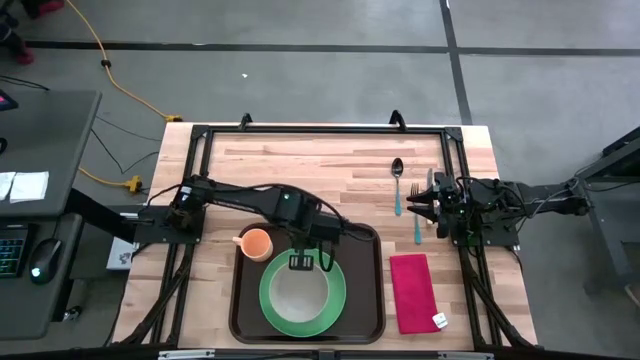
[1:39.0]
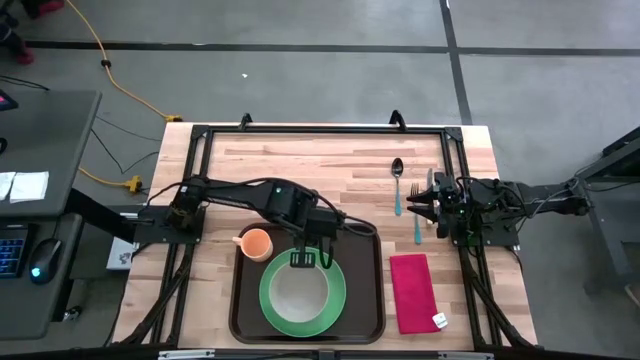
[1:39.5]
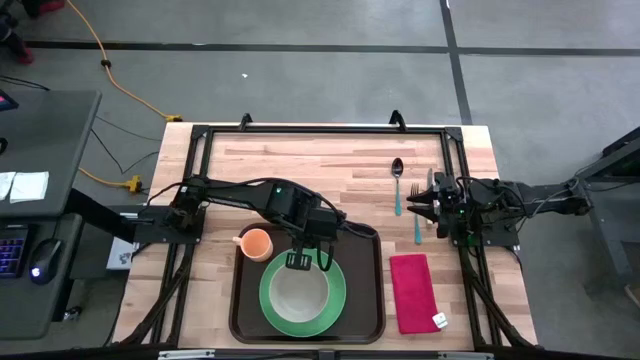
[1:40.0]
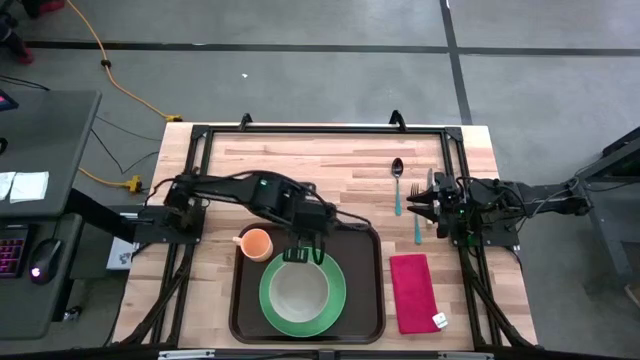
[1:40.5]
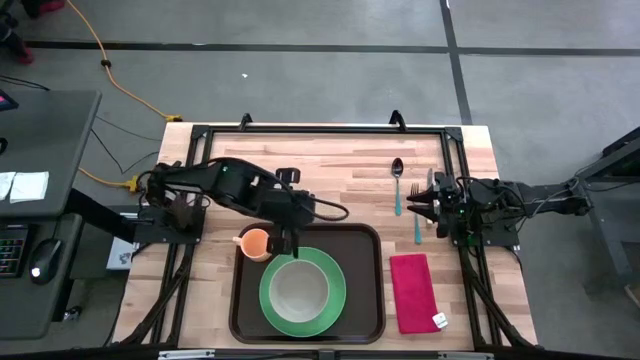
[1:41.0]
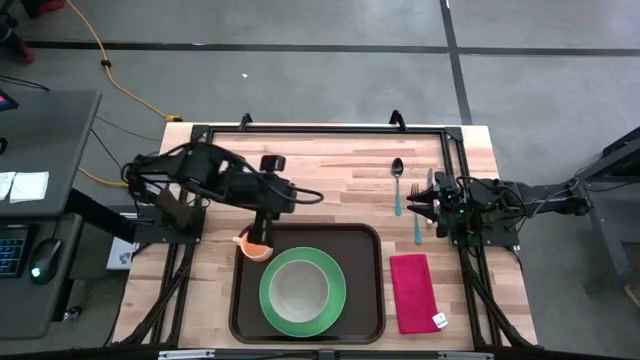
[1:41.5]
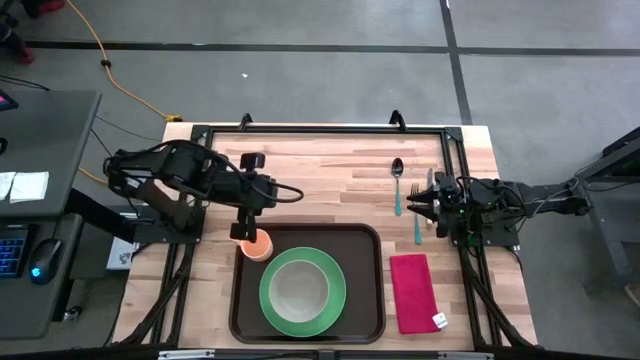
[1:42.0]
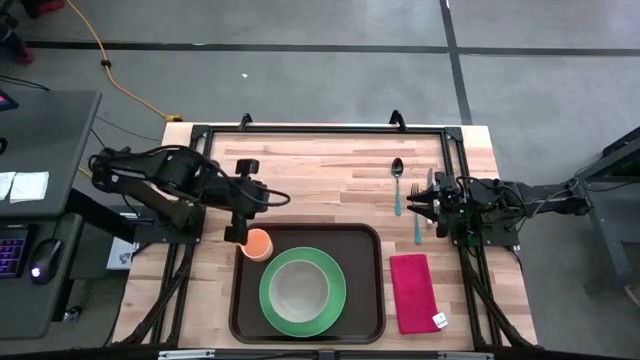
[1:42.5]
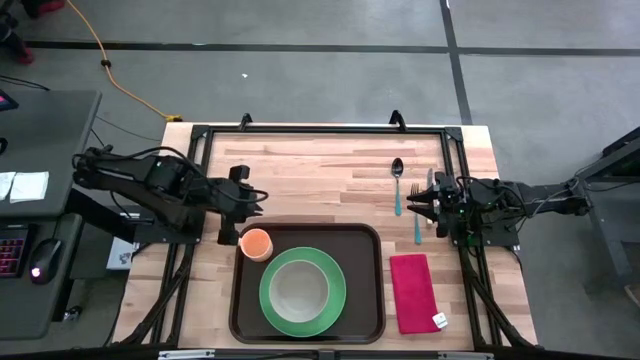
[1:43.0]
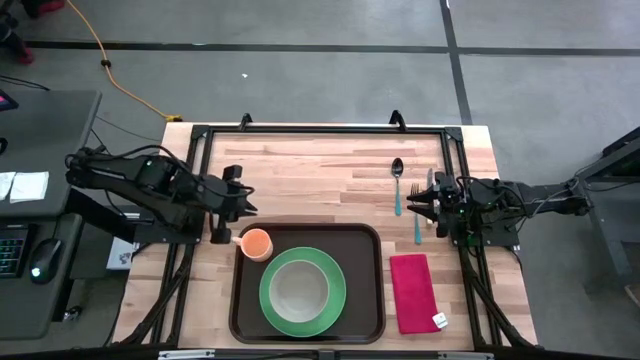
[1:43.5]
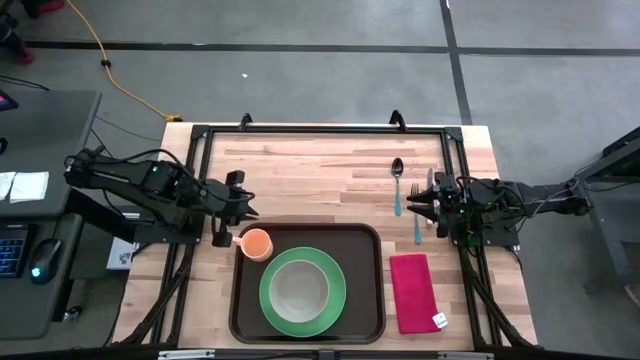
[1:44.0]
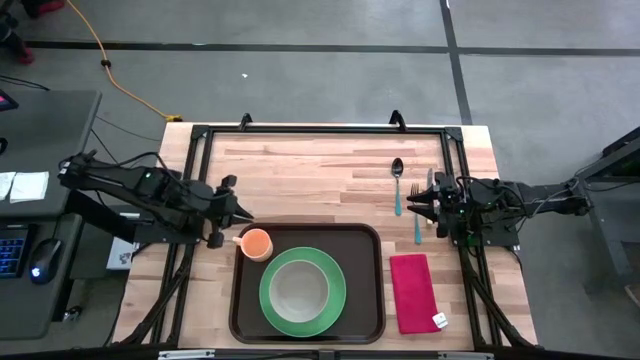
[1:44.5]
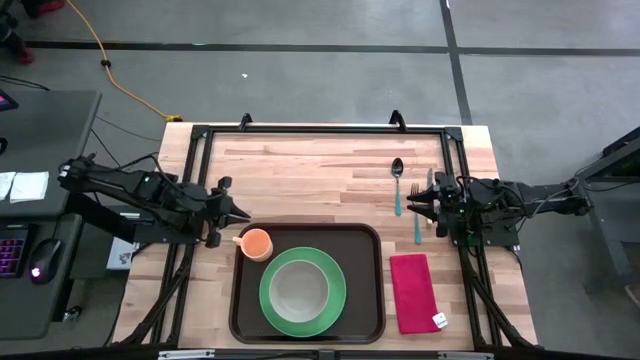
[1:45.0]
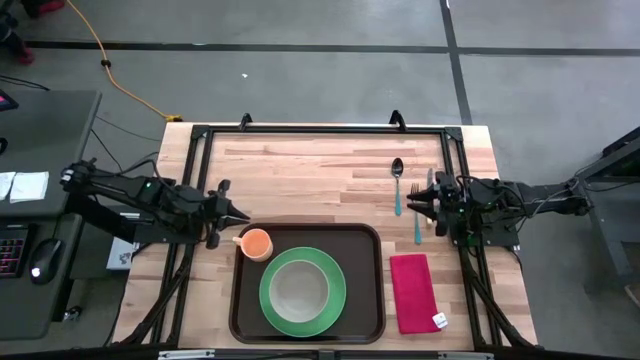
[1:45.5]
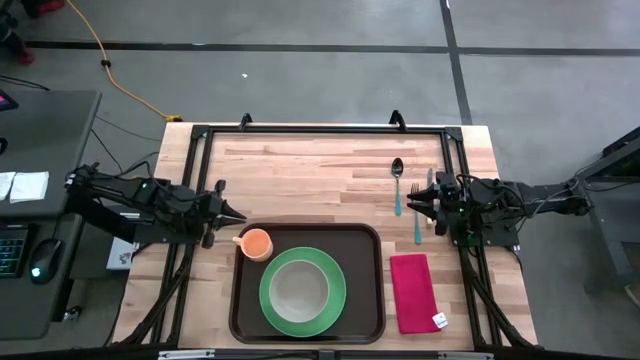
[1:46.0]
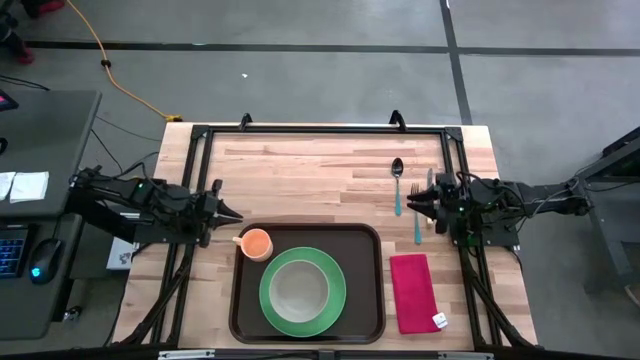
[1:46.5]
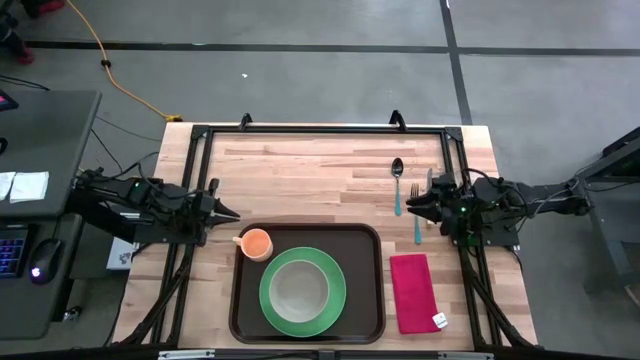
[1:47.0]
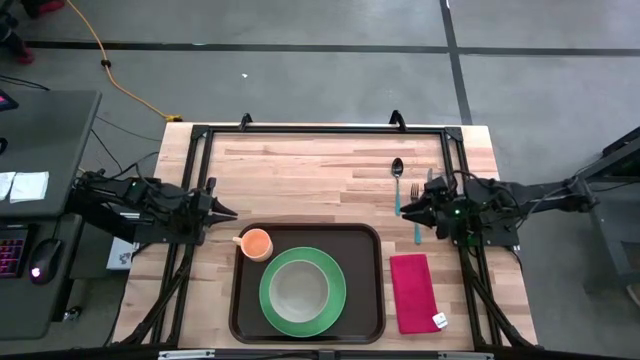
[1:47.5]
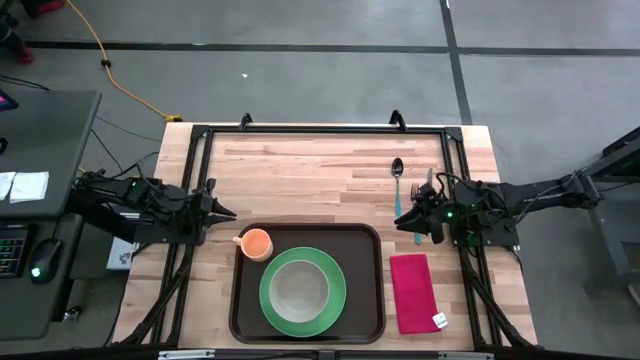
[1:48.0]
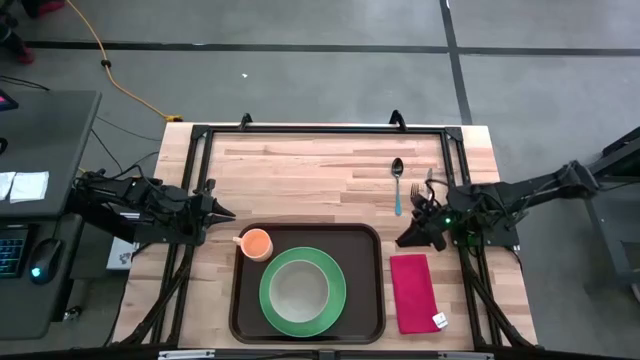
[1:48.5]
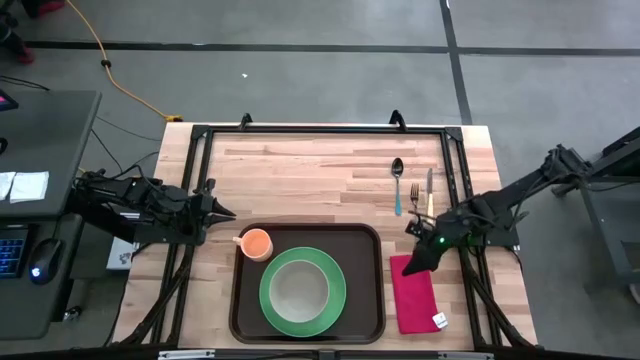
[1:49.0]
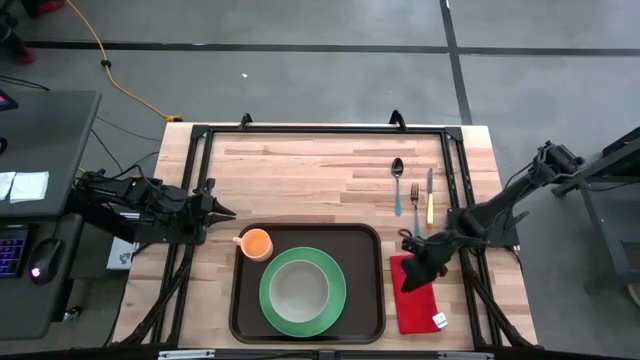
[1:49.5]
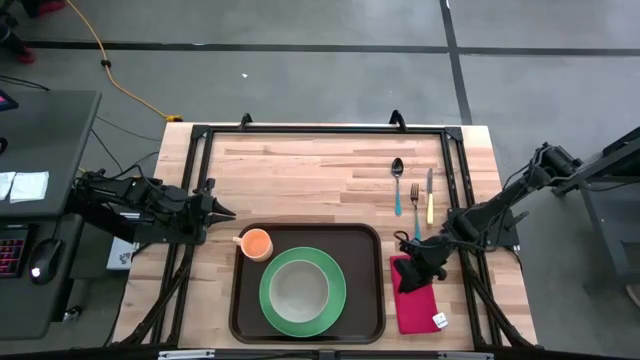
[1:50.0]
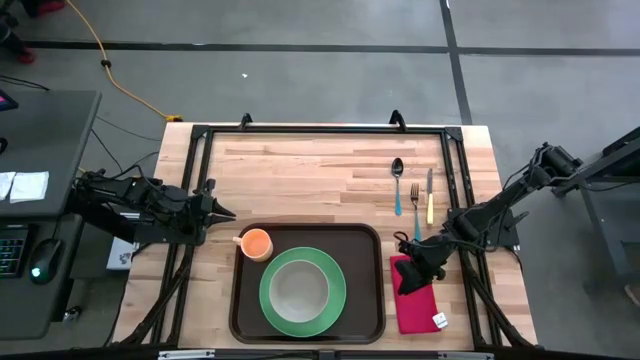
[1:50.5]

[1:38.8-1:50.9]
Task: Set up tray
Put the red napkin to the right of the green plate on the brown tray

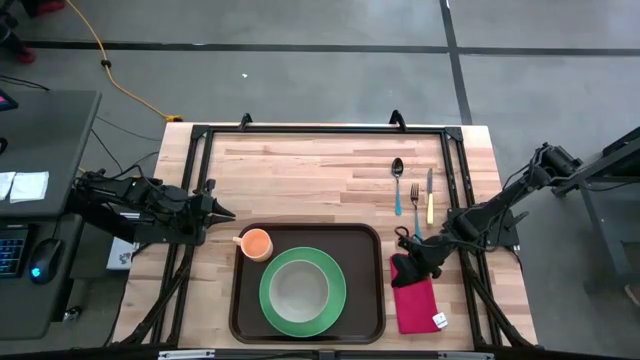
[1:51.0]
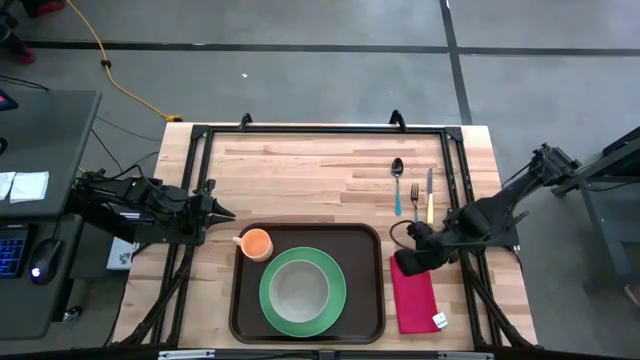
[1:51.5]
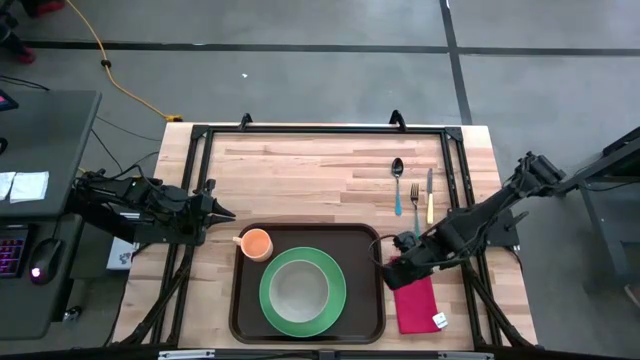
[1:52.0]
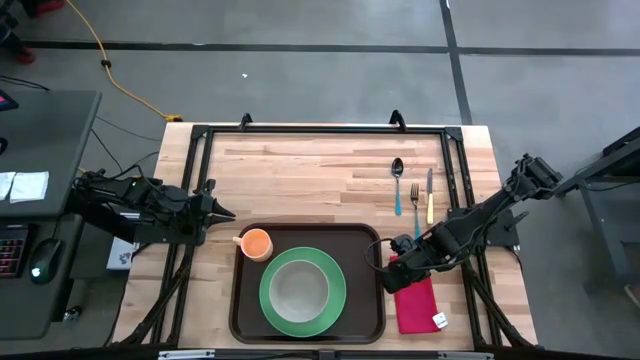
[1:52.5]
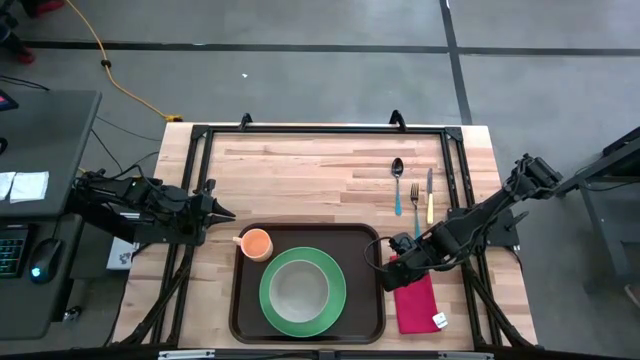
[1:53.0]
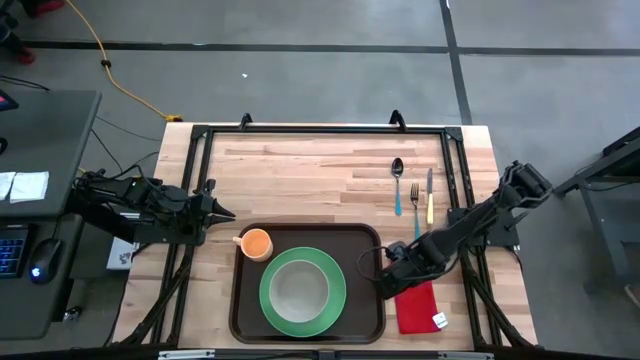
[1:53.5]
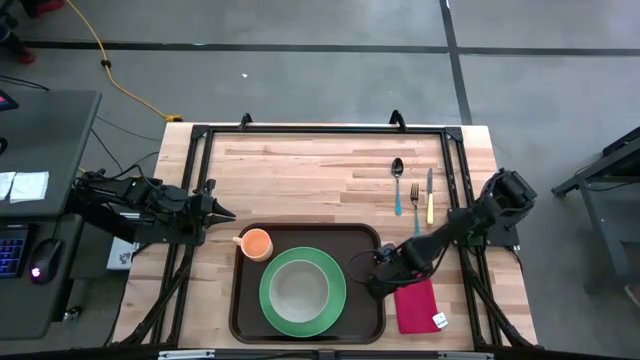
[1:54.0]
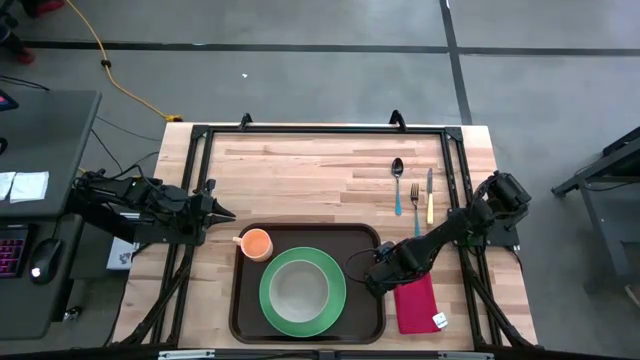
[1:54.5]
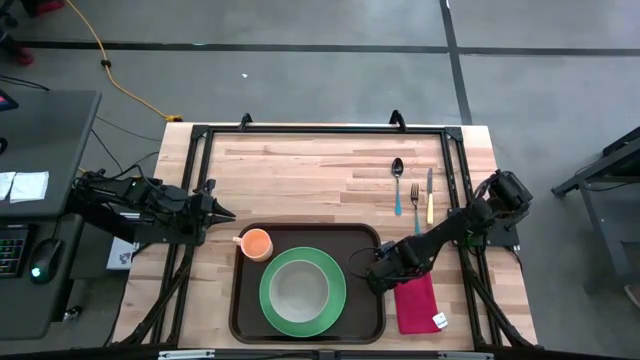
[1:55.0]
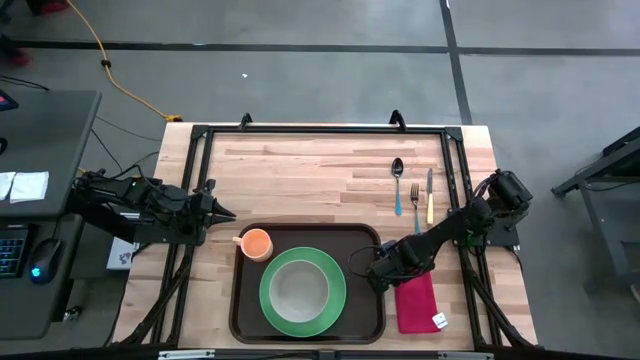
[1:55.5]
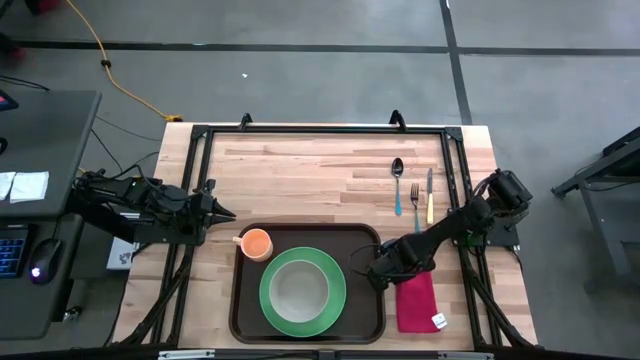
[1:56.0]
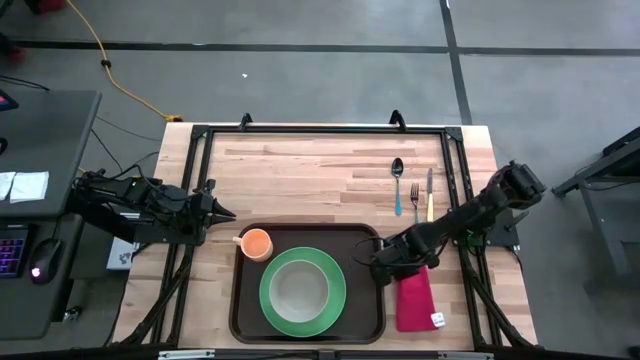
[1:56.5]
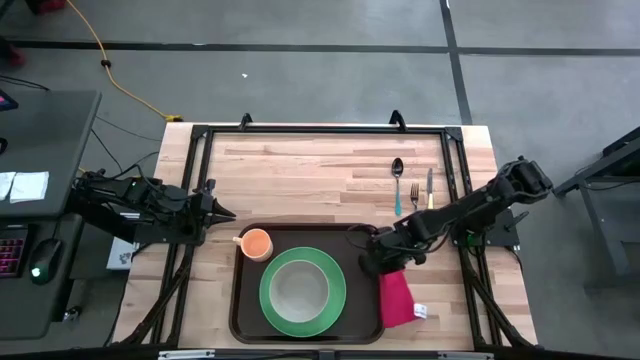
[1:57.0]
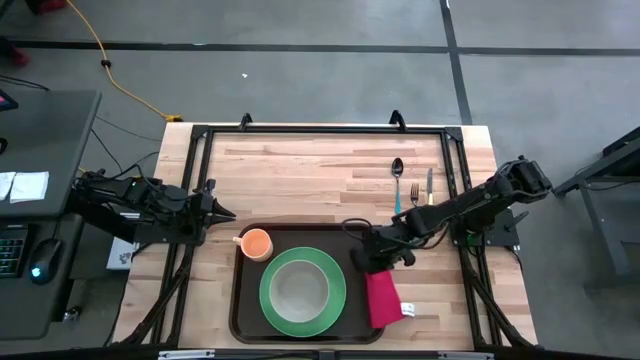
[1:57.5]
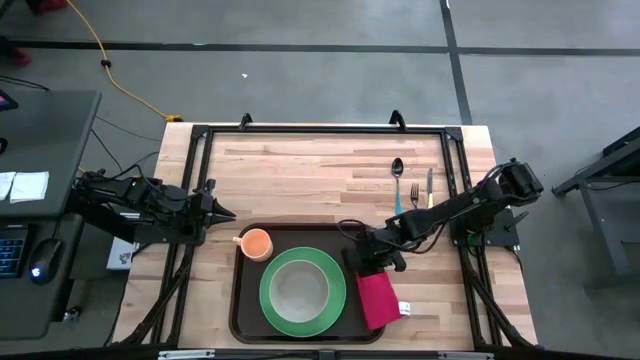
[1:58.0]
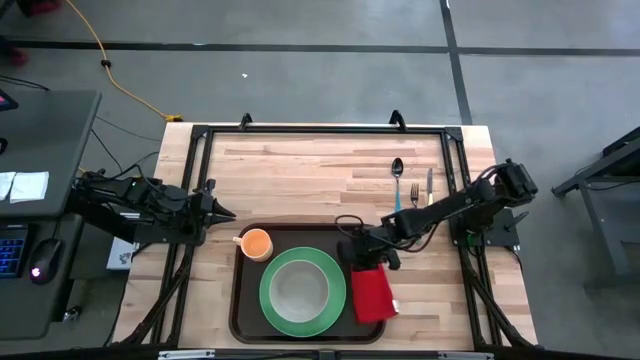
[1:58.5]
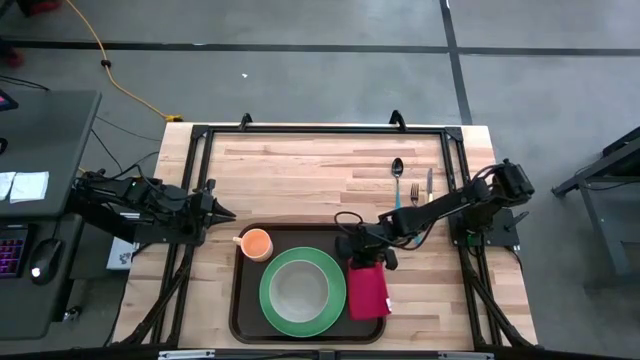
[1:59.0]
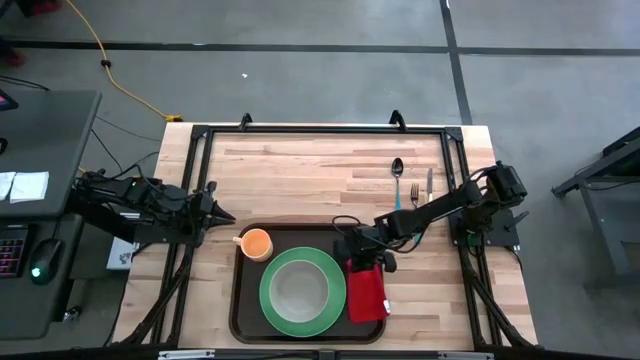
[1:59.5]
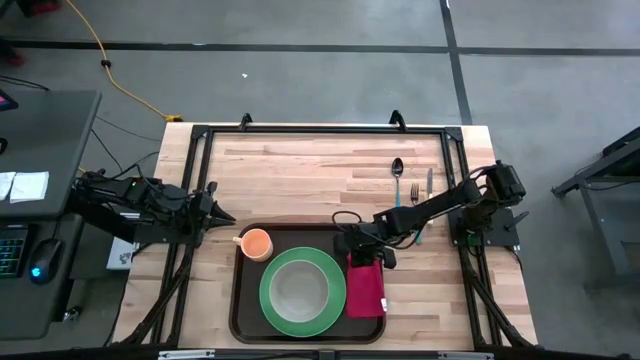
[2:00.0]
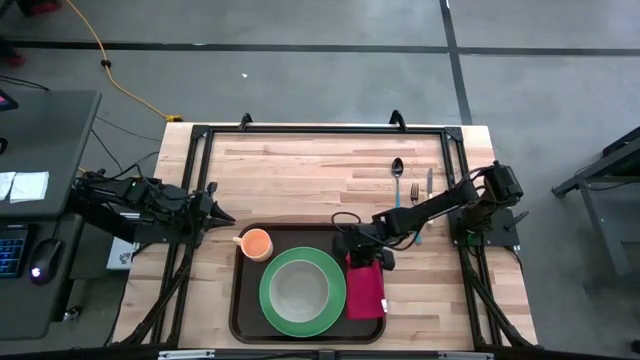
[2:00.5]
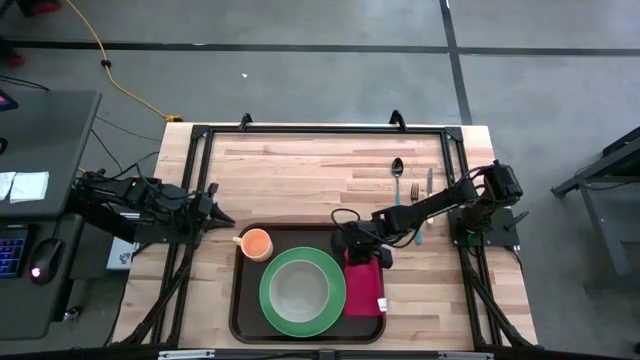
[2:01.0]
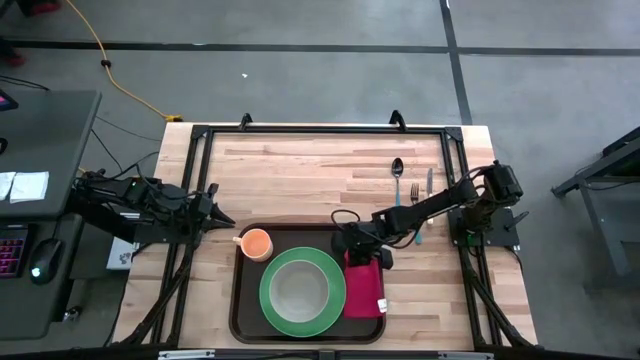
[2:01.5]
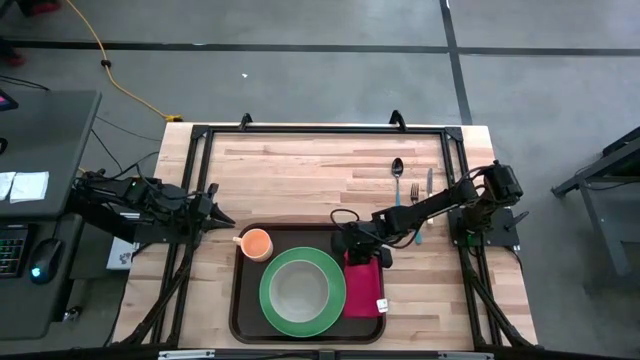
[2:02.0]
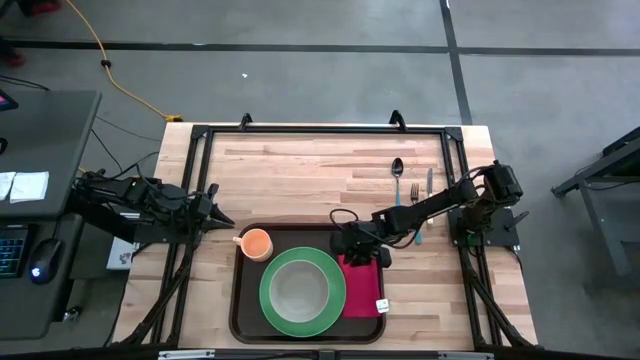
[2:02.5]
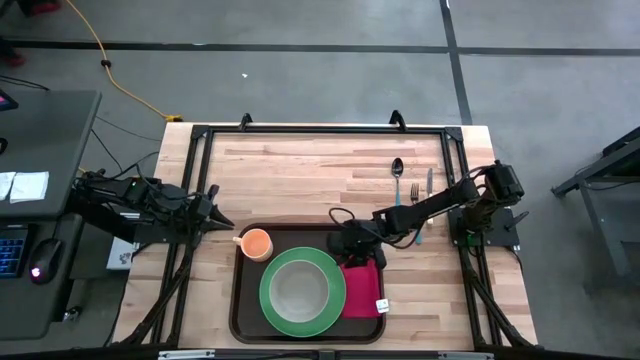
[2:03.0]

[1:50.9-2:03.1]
Put the red napkin to the right of the green plate on the brown tray
